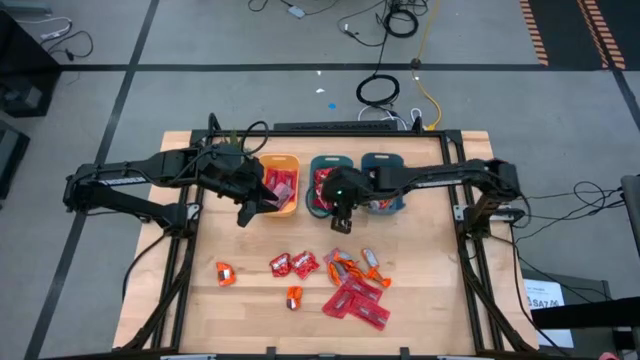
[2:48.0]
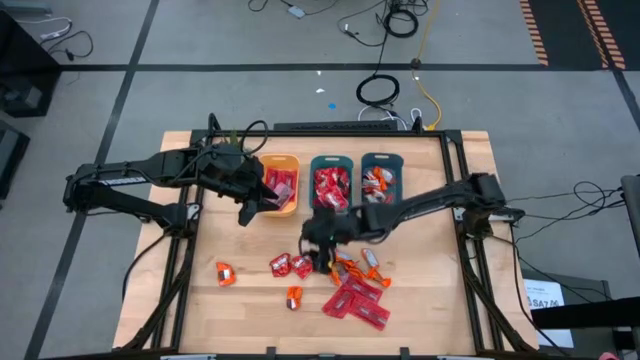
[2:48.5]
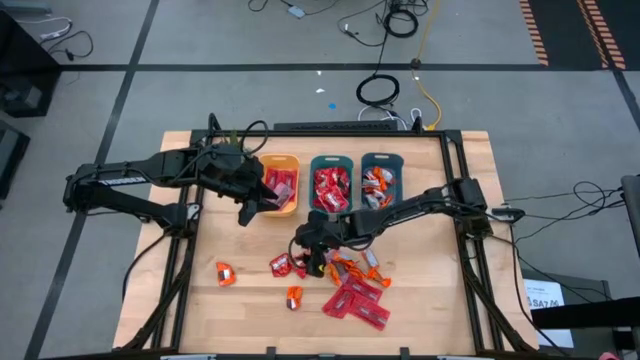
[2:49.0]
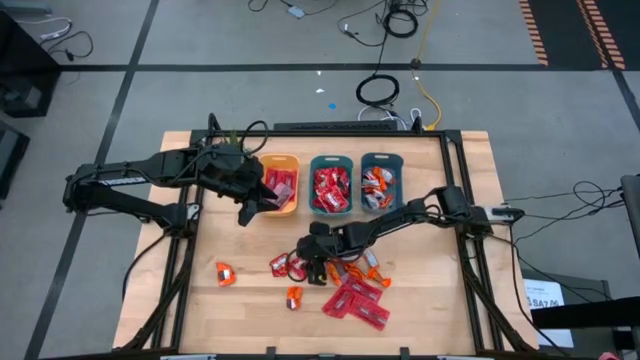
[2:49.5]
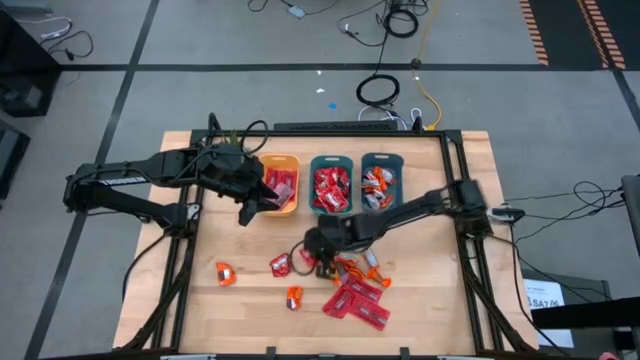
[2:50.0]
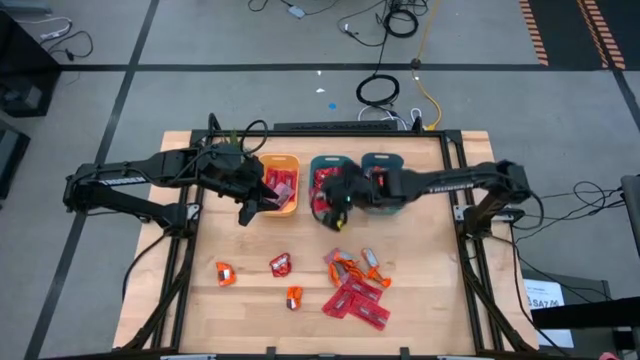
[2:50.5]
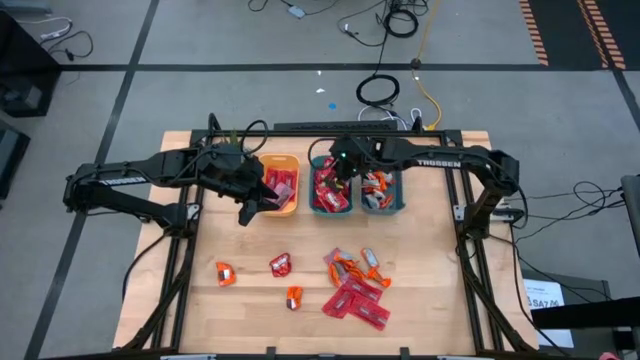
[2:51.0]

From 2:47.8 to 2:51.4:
Task: Sort candy
Put the red candy into the top center green bin

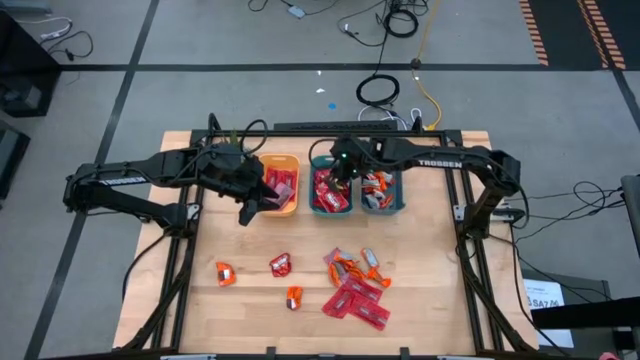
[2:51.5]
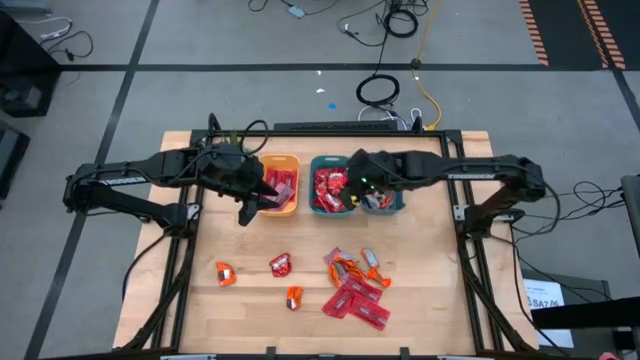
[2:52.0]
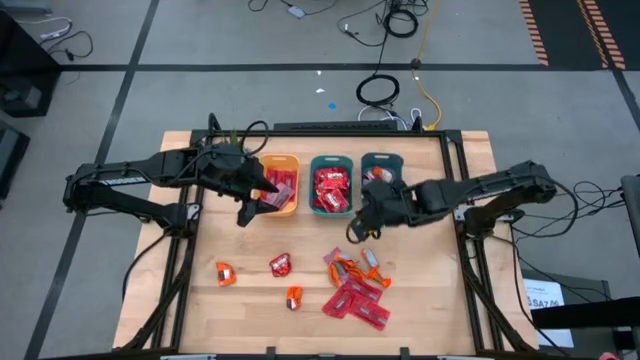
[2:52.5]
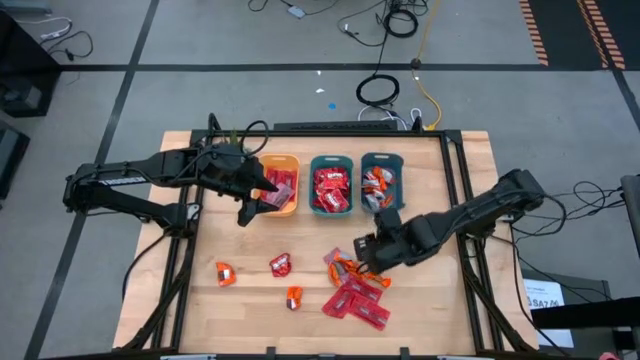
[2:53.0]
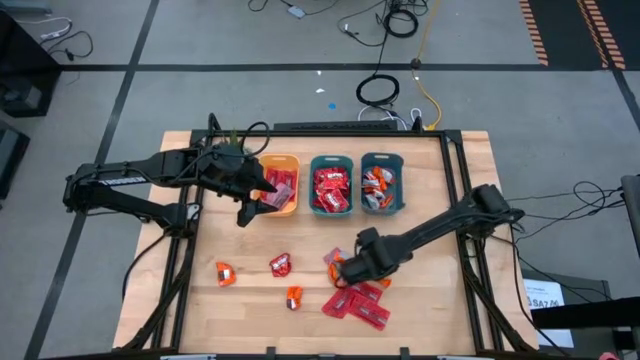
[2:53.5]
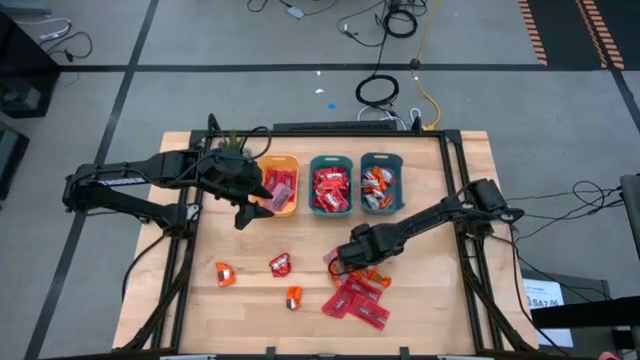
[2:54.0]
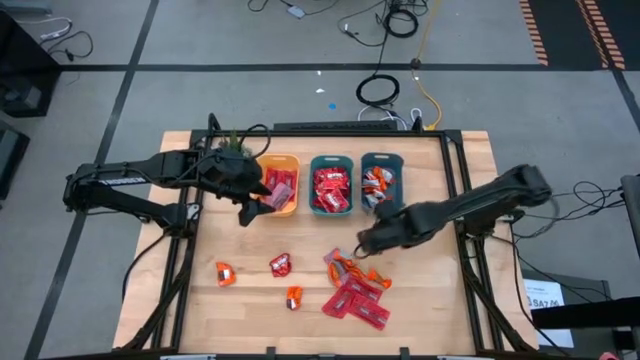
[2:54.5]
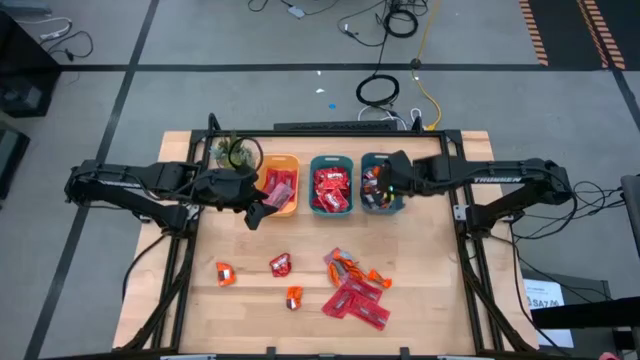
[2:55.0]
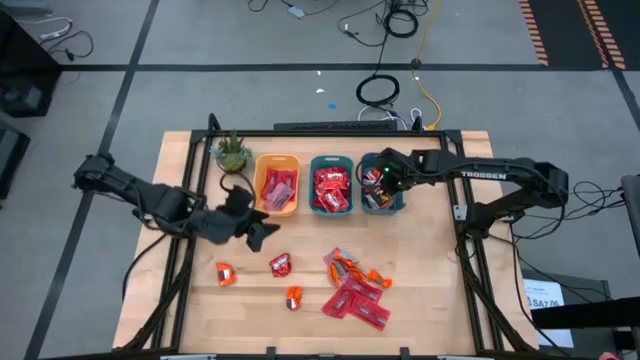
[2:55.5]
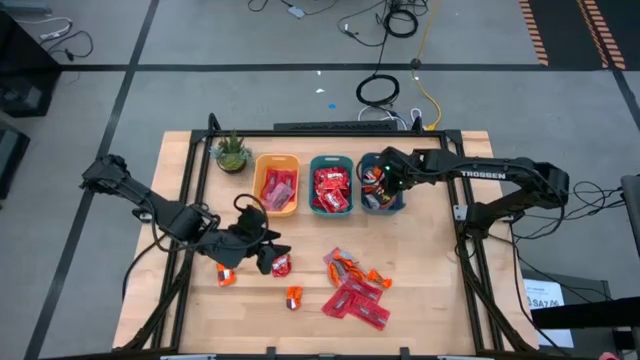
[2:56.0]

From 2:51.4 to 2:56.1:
Put the orange candy into the top right blue bin

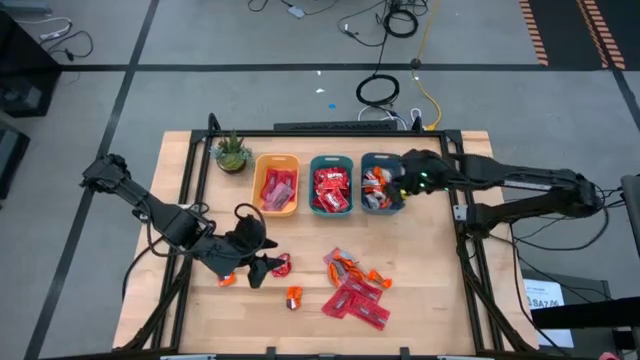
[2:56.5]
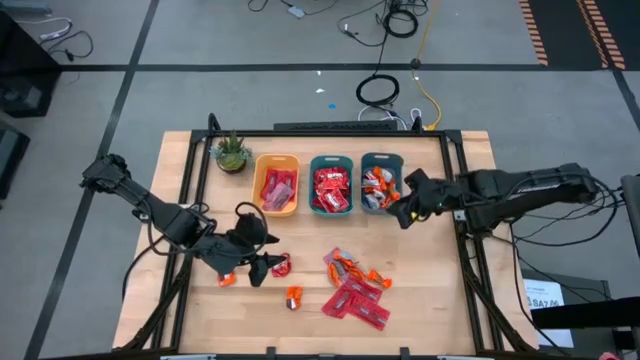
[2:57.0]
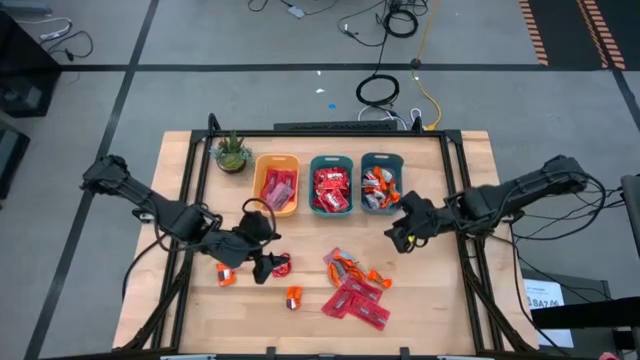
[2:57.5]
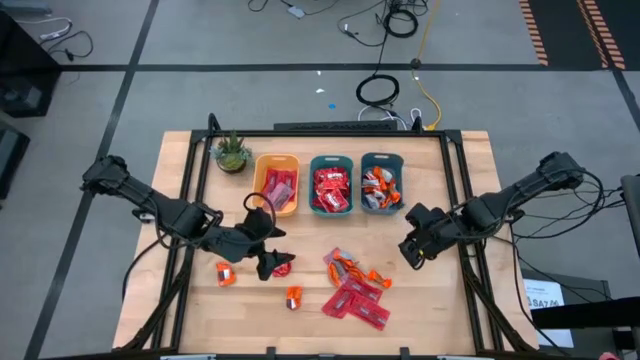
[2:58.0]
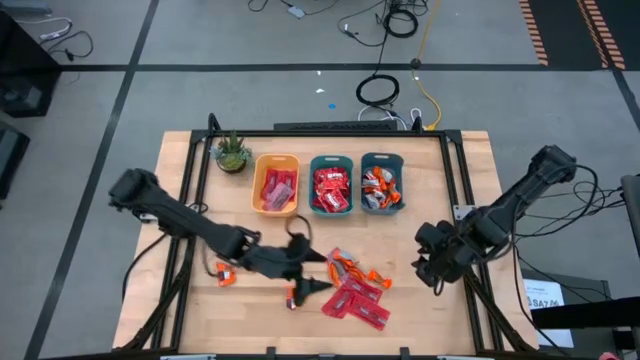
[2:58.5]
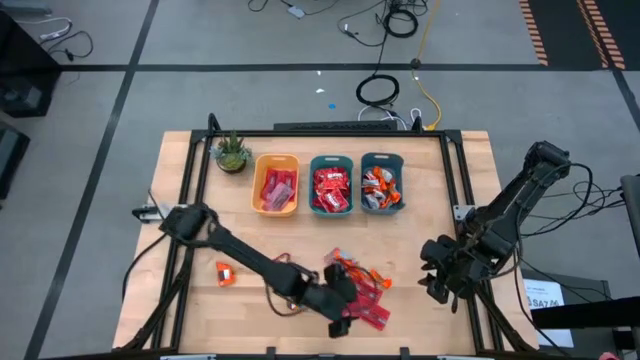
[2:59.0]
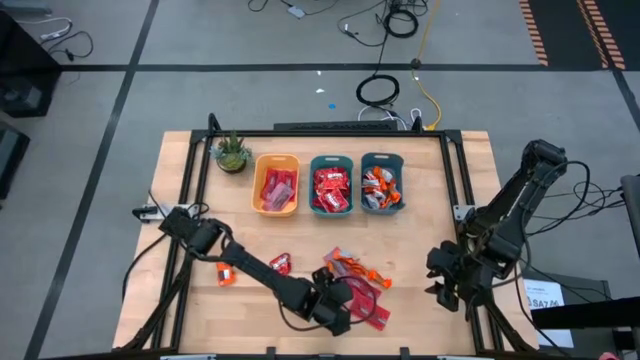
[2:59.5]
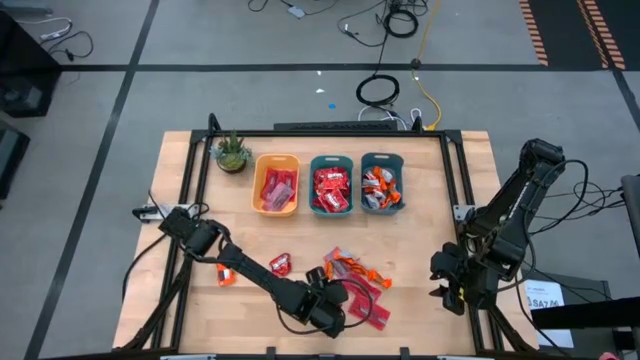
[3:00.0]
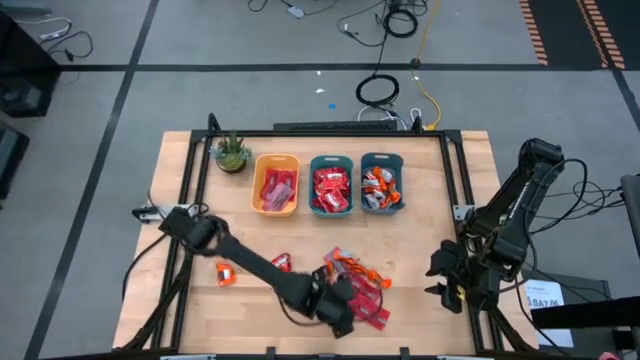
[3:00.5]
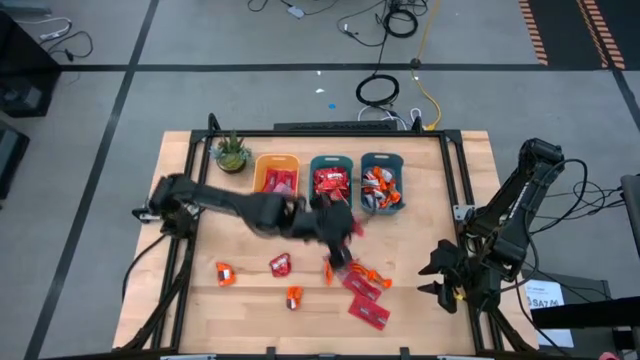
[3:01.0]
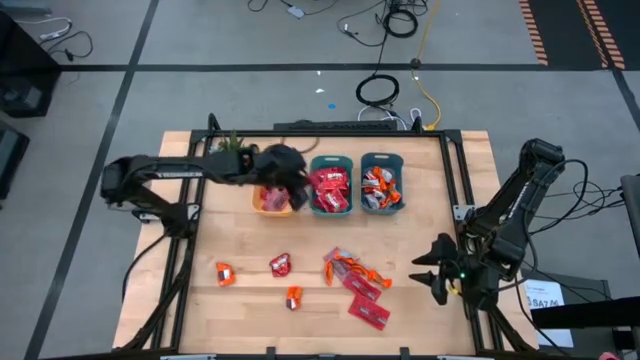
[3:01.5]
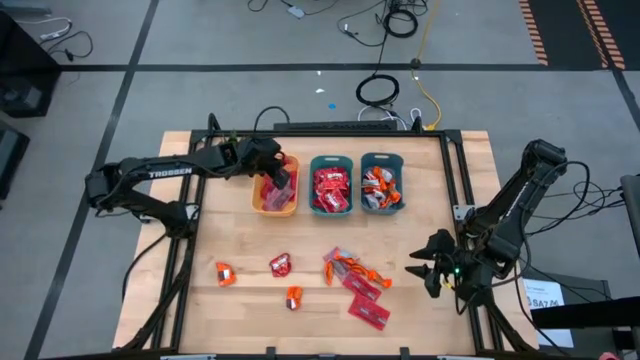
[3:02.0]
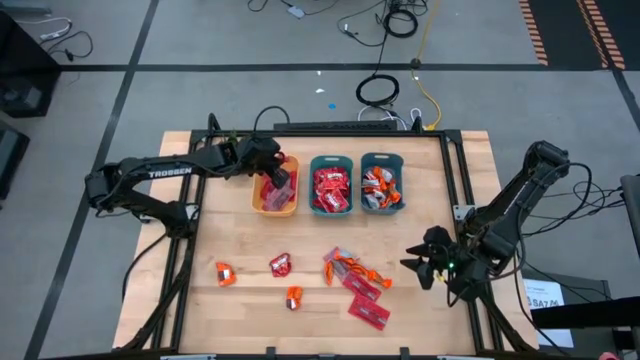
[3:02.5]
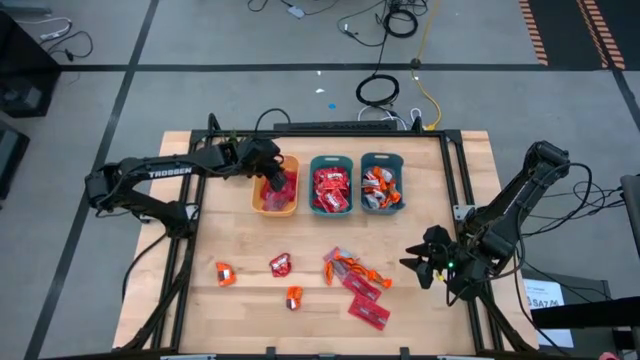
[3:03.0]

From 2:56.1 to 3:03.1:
Put the red candy into the top left yellow bin

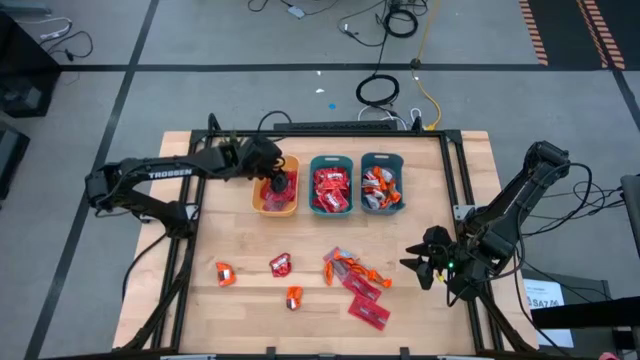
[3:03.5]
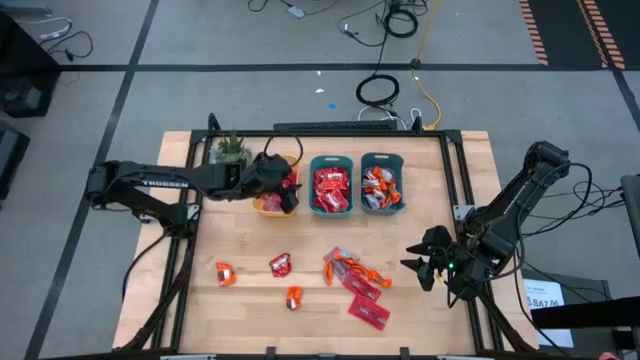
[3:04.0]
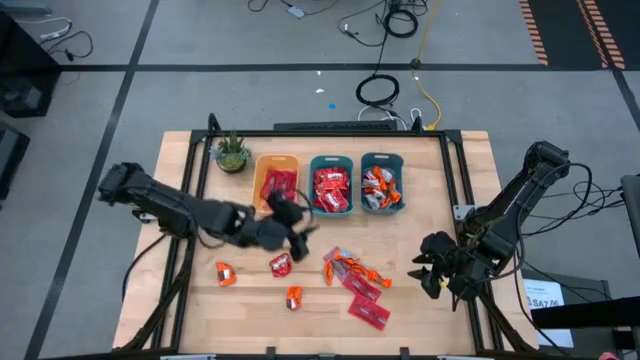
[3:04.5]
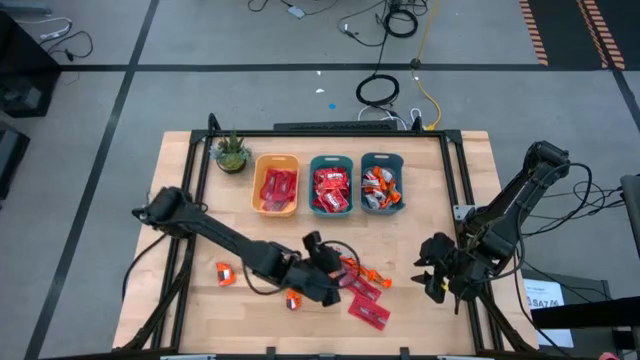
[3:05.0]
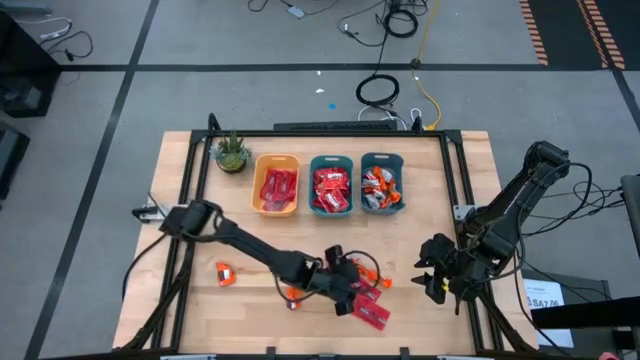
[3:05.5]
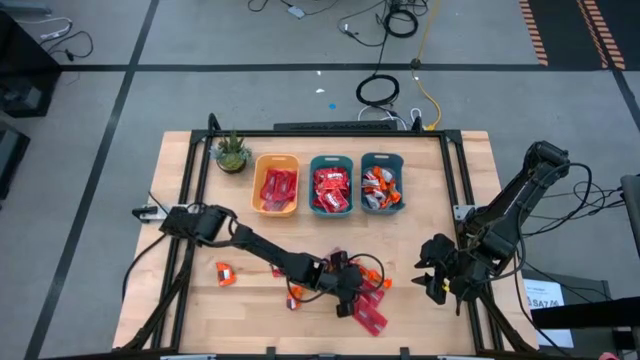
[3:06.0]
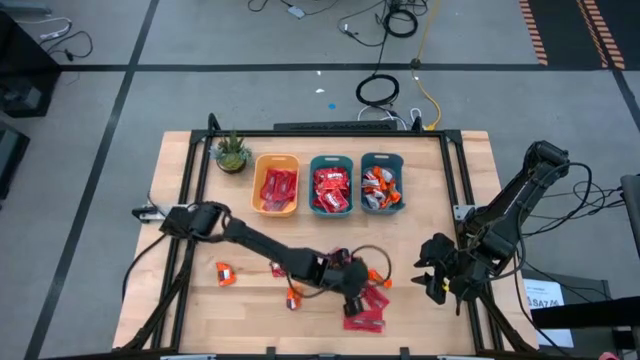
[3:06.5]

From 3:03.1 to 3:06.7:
Put the red candy into the top left yellow bin

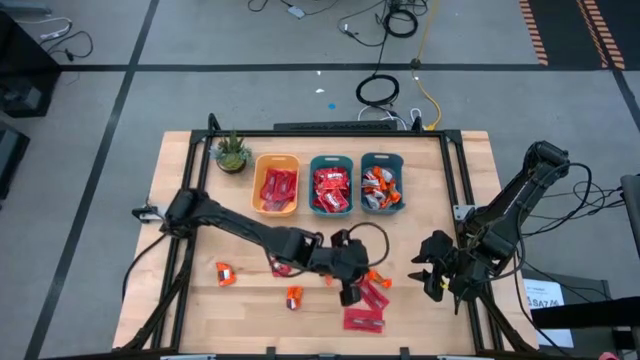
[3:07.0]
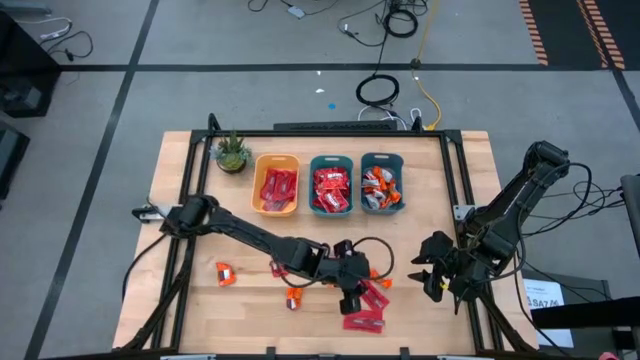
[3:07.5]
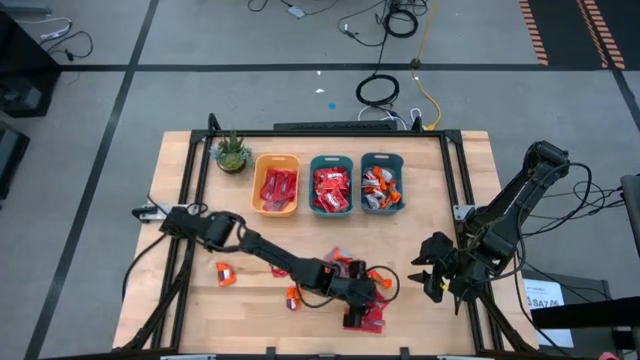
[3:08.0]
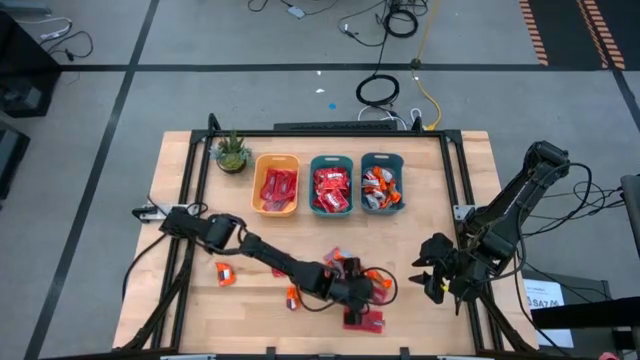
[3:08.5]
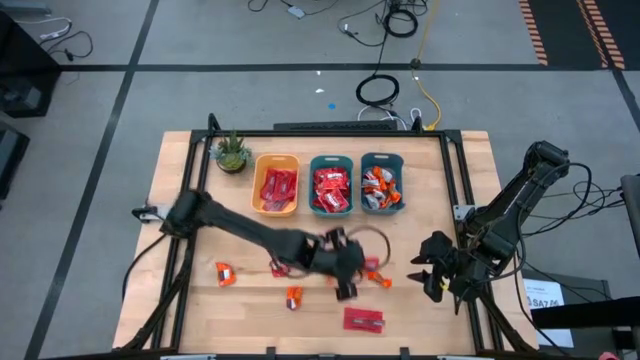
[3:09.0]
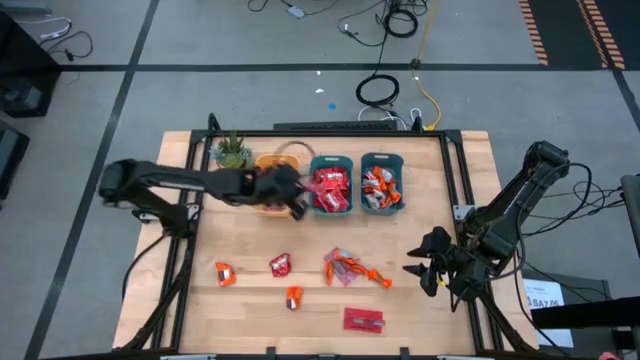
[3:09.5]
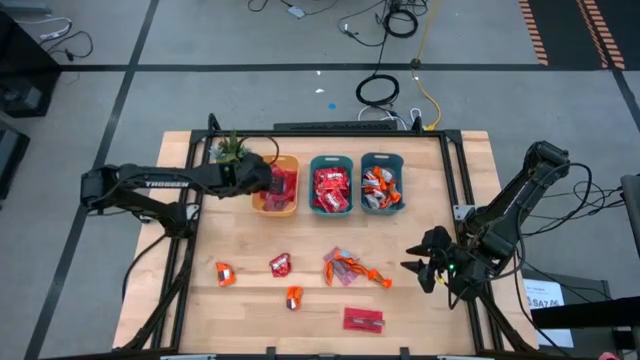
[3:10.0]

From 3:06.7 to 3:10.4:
Put the red candy into the top left yellow bin
